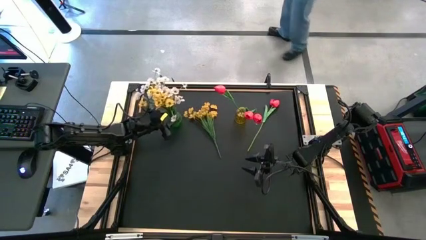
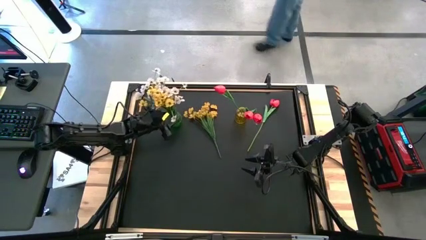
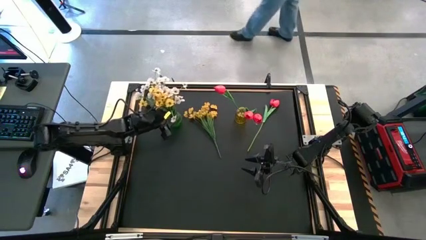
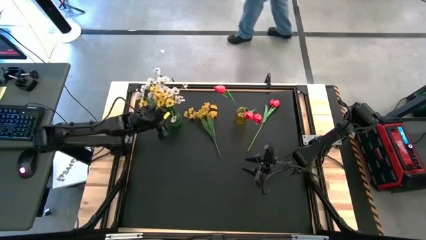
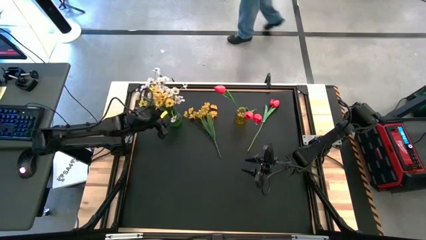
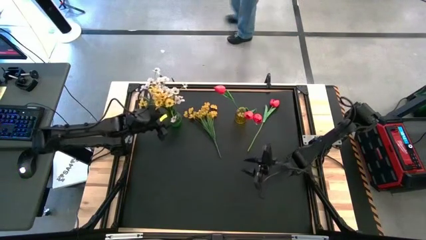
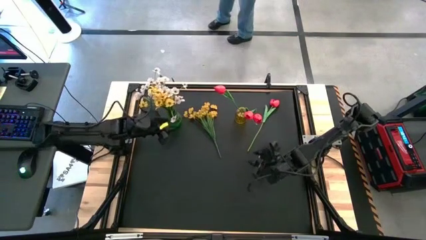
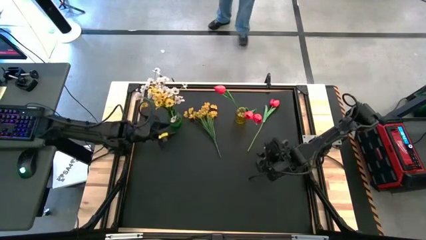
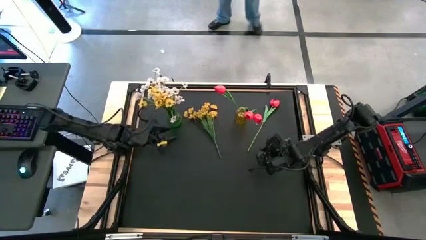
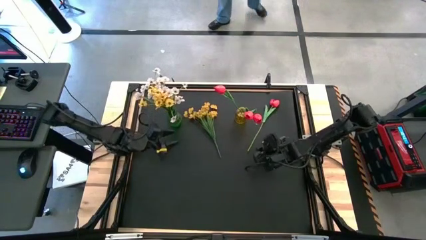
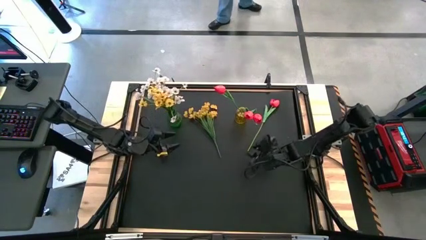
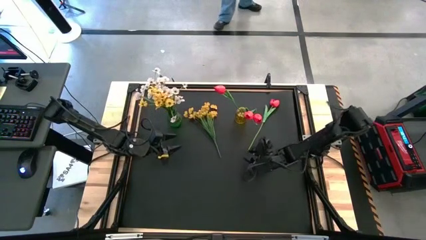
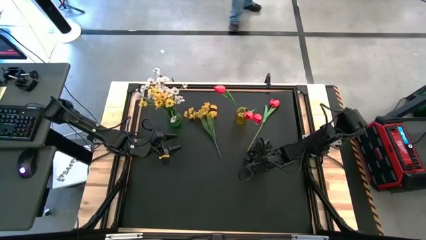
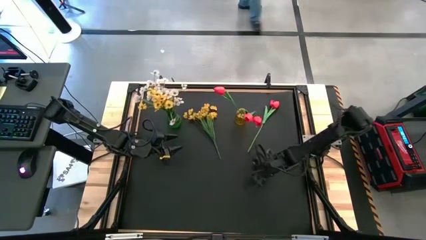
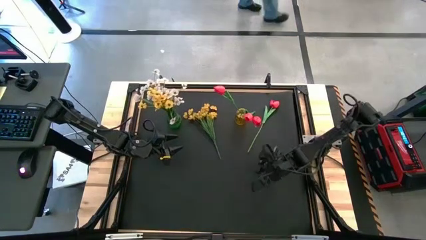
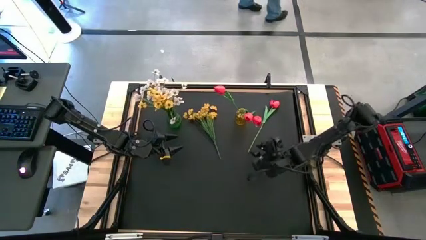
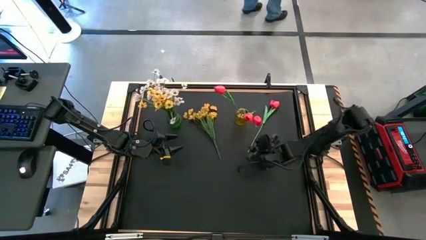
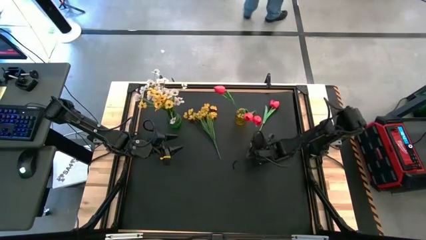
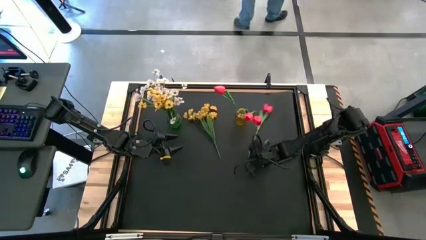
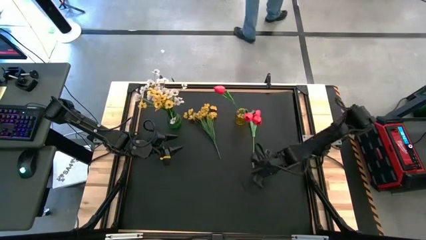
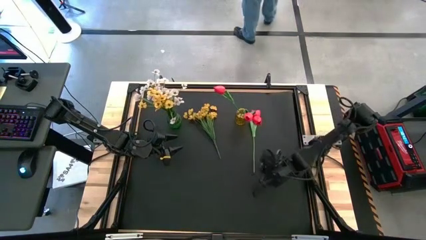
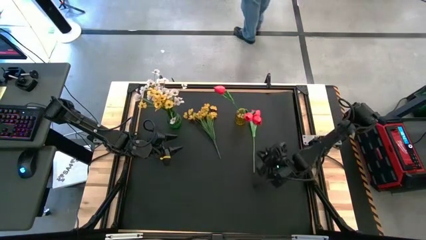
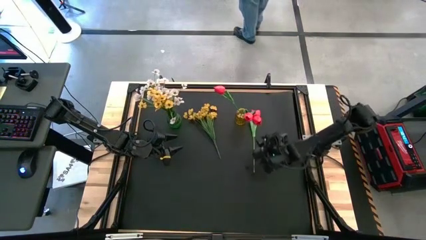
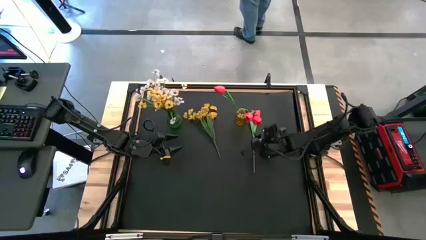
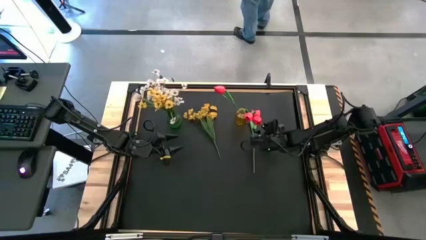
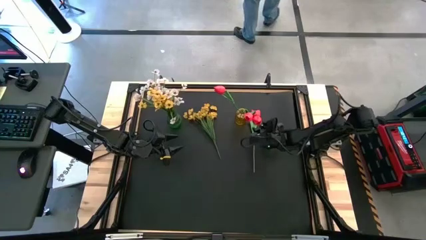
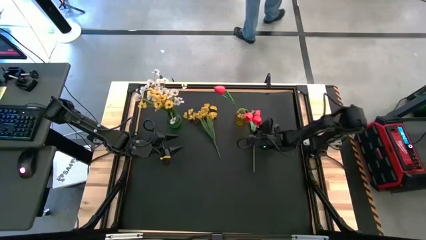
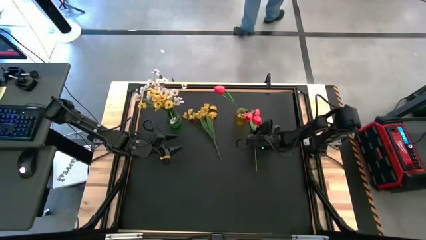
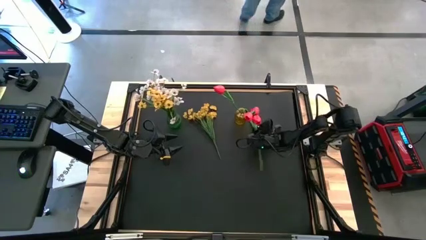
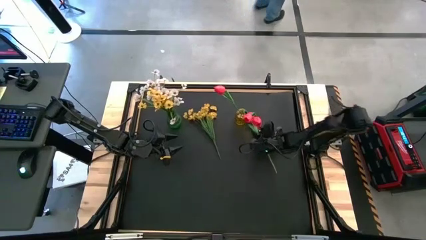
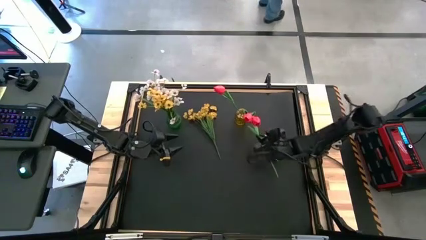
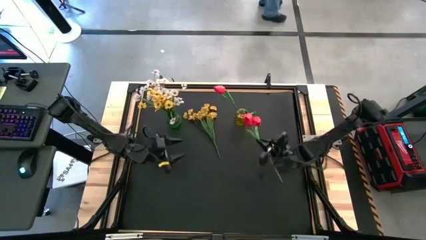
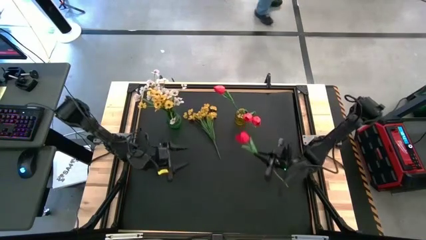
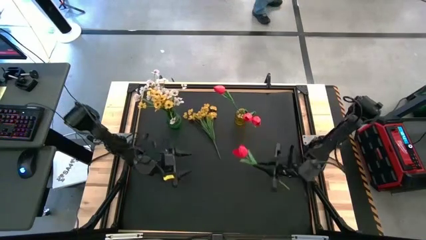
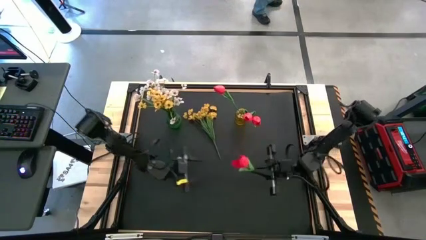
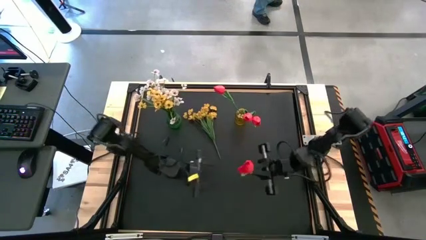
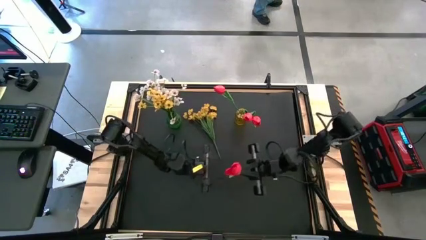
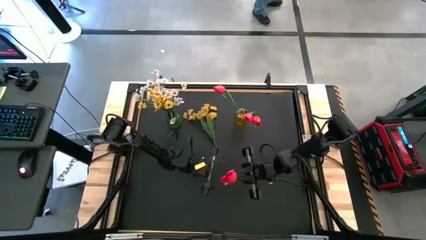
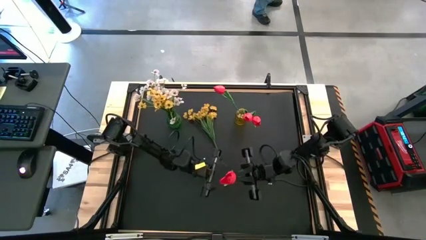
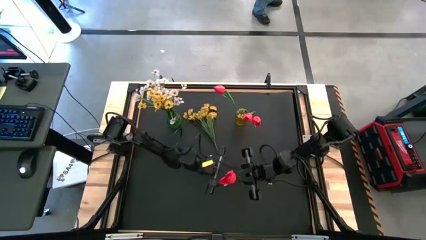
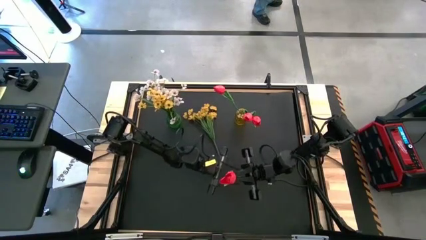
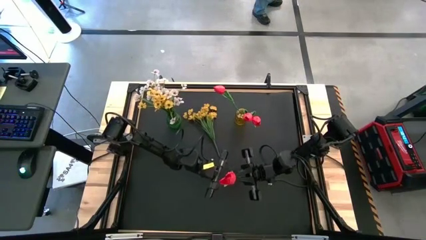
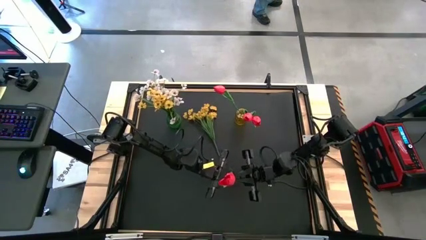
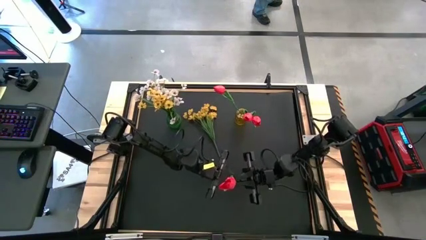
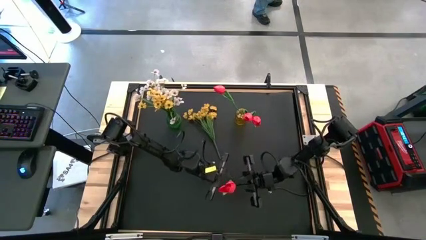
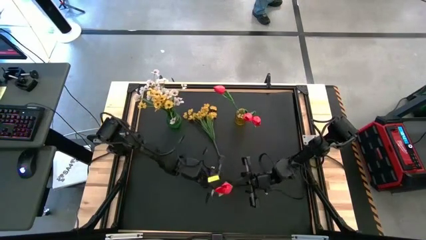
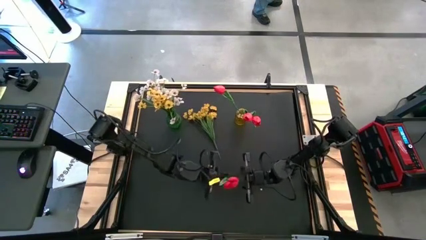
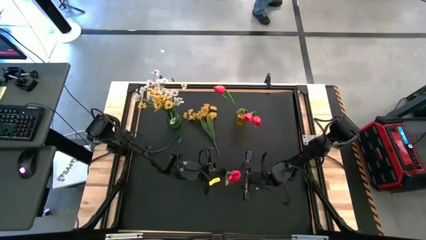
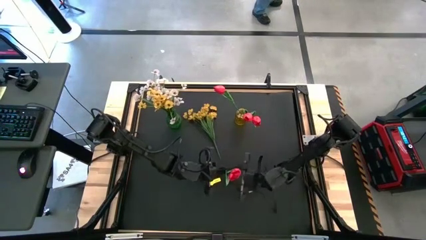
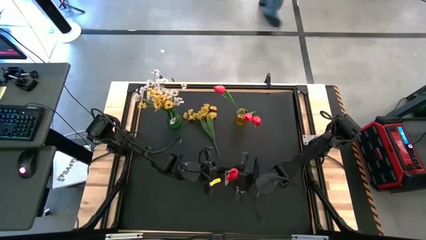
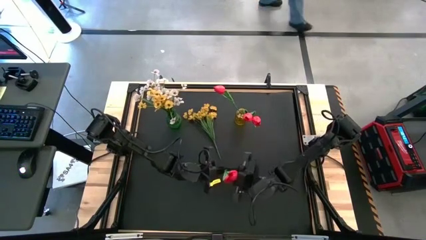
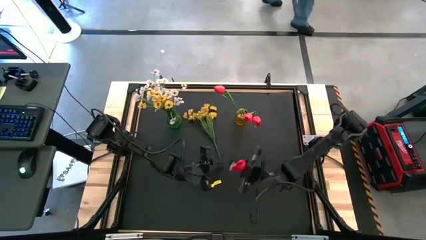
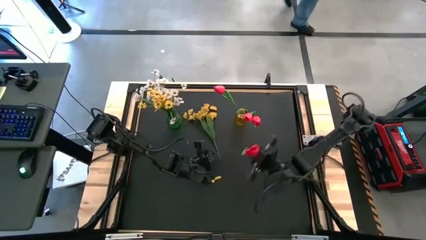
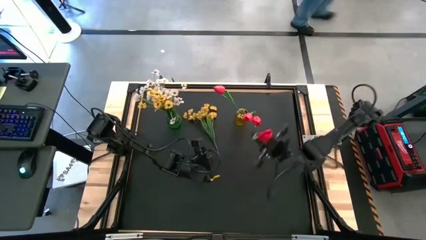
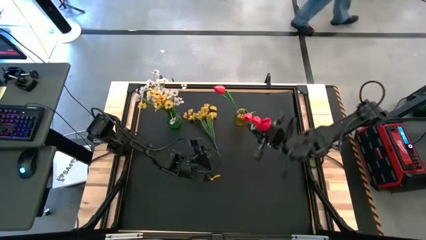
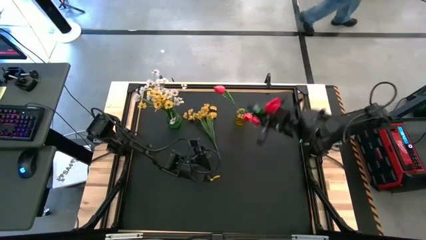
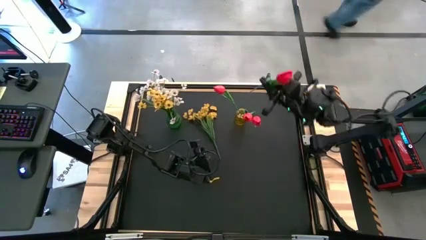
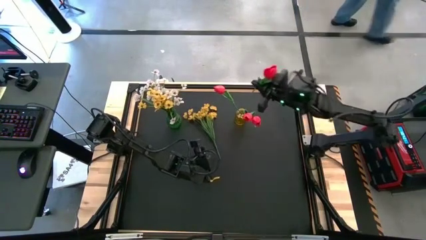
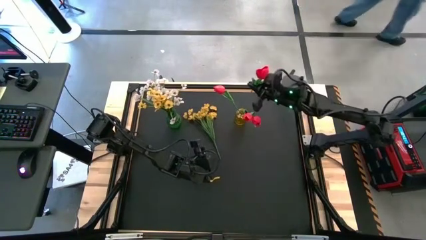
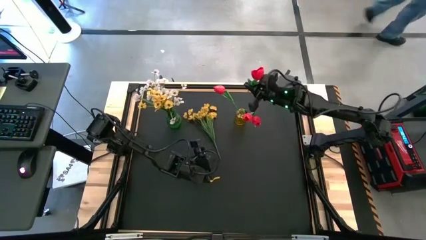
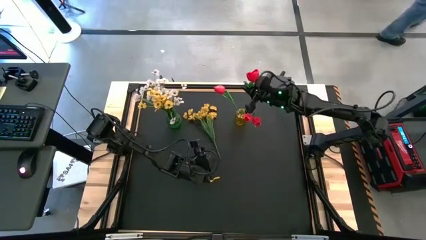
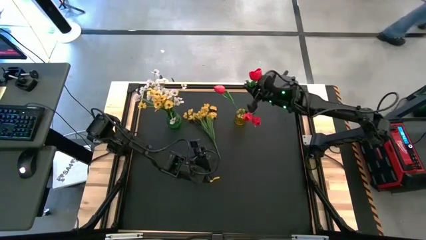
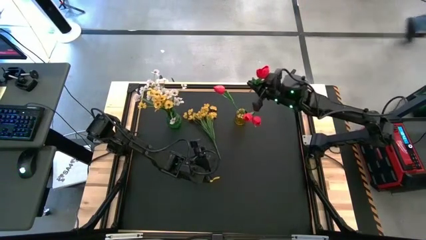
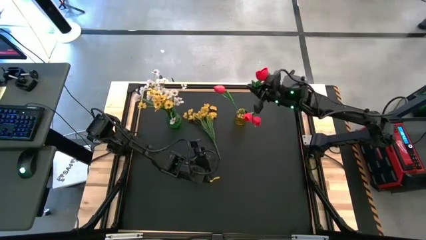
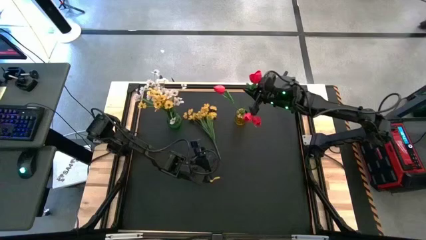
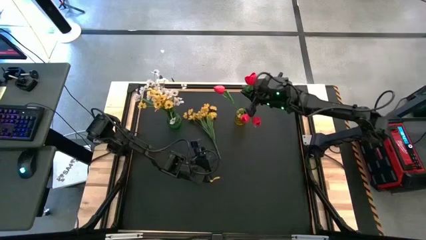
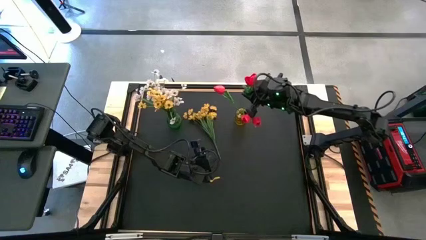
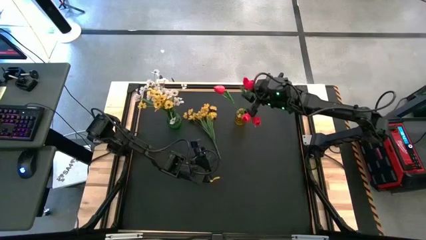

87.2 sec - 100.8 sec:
Task: Sort flowers into vase by color
Put the pink flower into the yellow vase

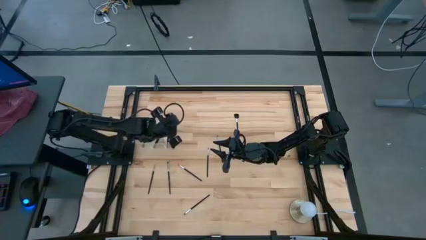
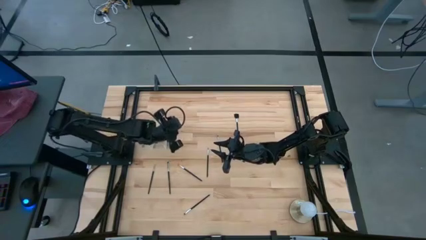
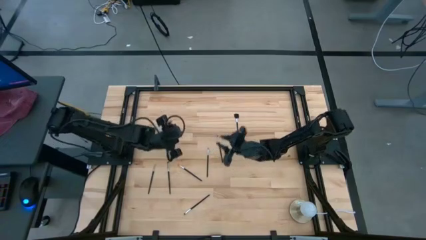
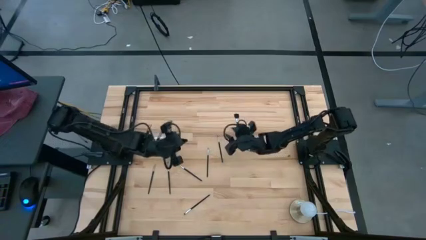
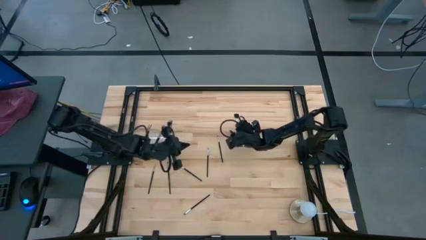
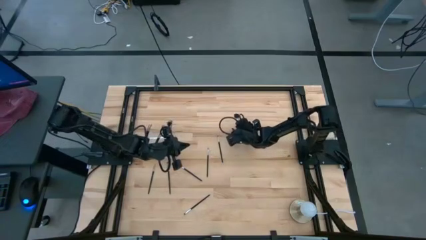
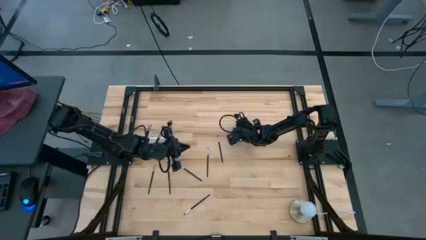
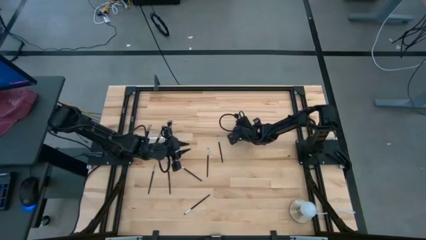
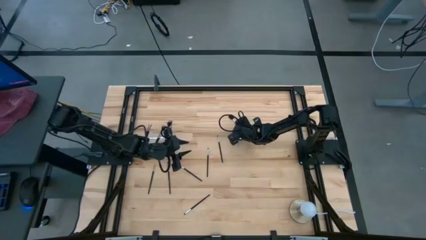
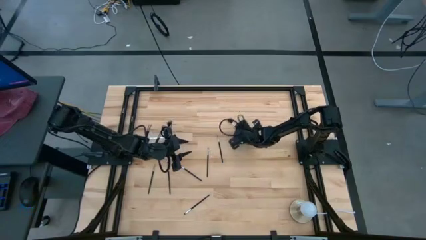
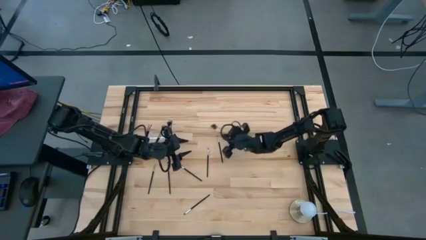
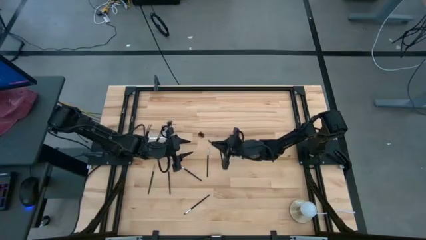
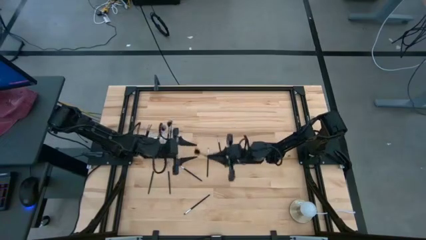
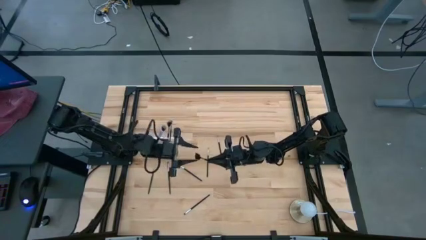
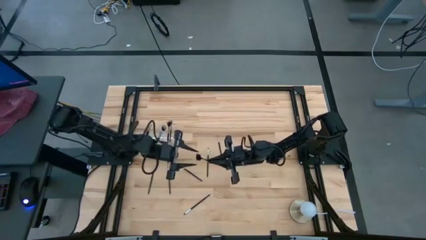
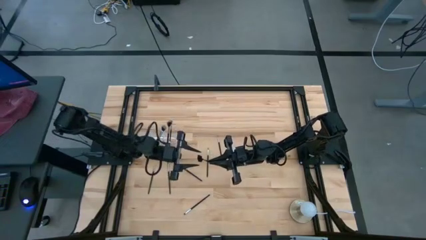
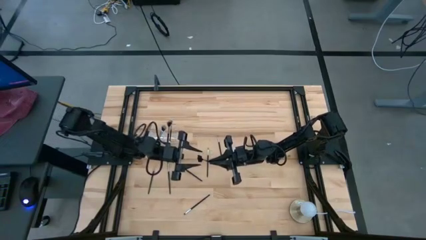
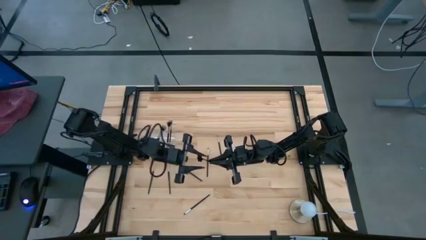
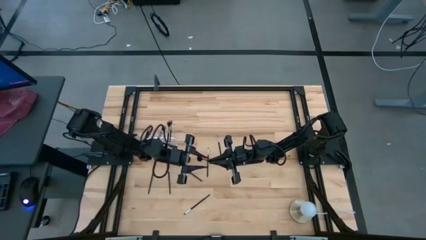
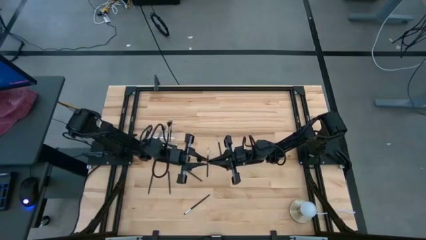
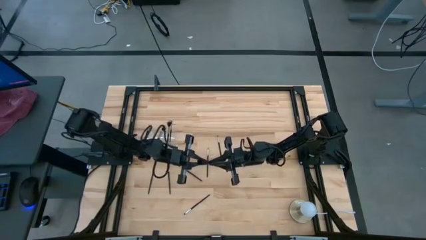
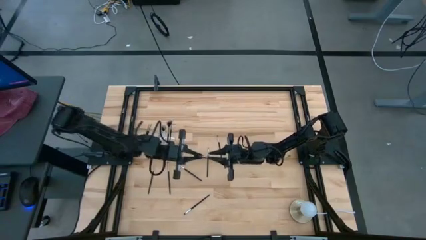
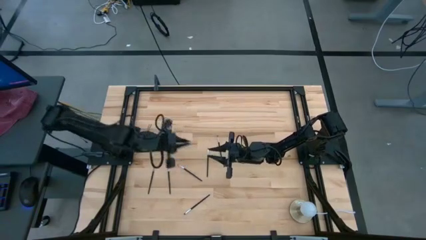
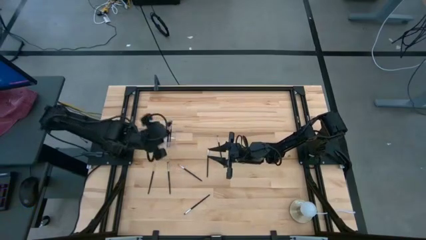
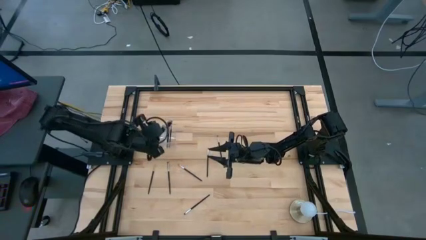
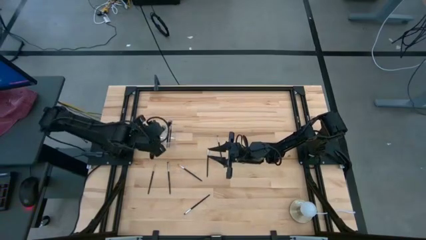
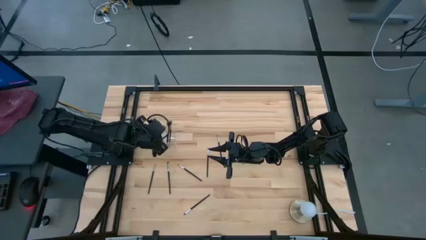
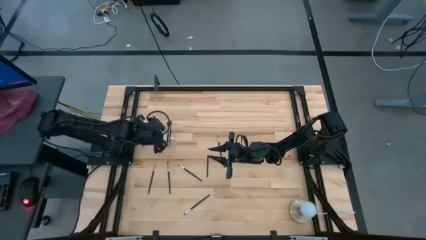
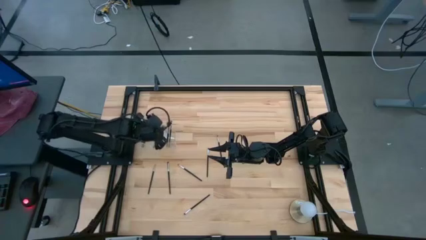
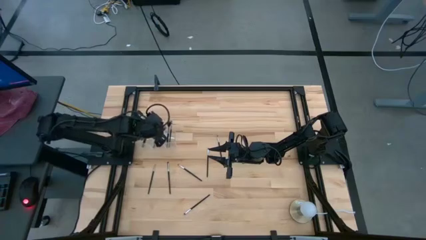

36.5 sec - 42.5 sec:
Task: Put items in baskets/containers
Put the black eyebrow brush into the transparent organizer
